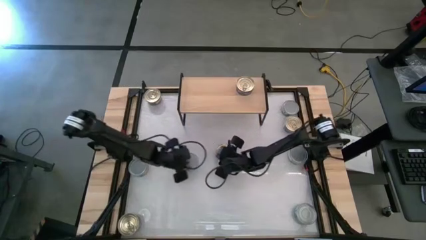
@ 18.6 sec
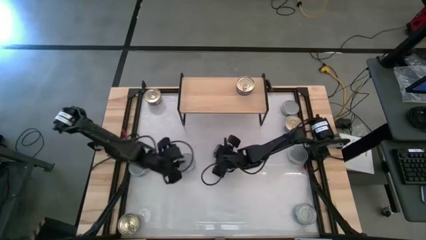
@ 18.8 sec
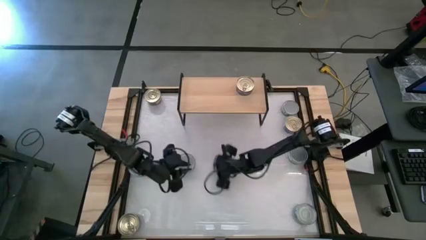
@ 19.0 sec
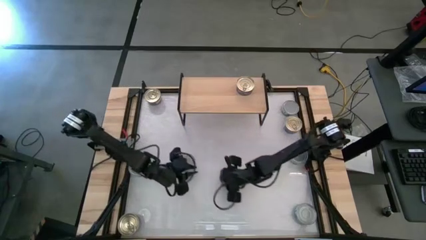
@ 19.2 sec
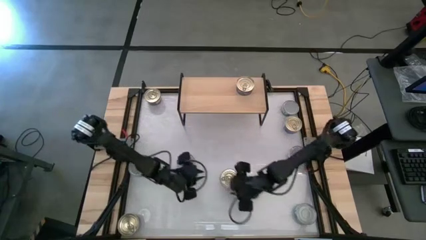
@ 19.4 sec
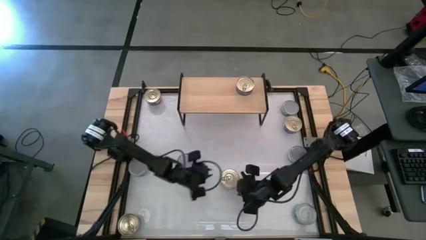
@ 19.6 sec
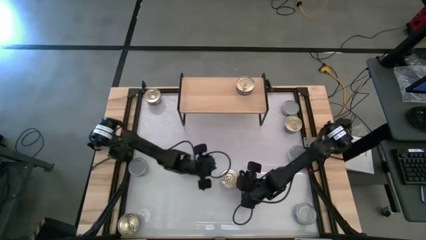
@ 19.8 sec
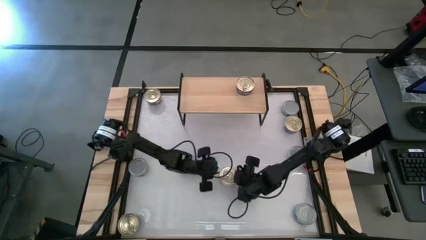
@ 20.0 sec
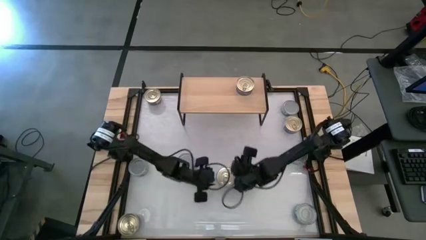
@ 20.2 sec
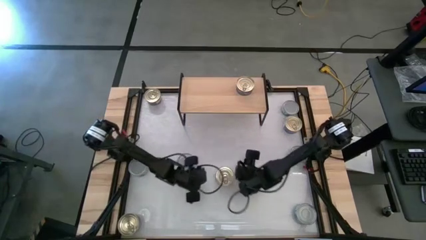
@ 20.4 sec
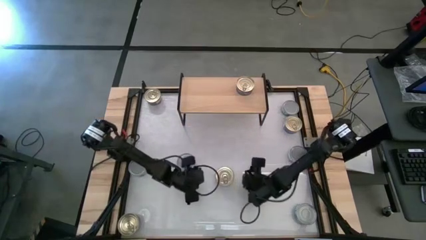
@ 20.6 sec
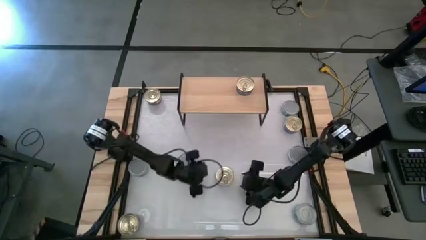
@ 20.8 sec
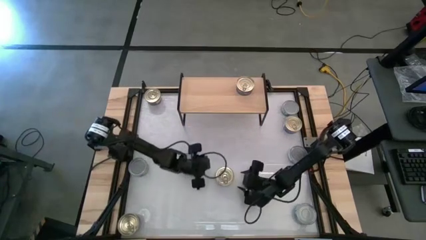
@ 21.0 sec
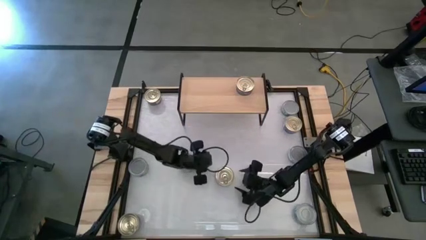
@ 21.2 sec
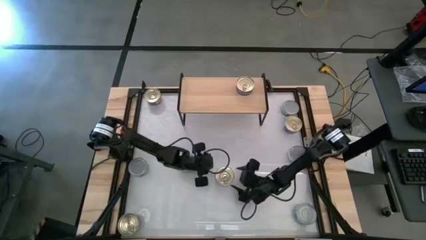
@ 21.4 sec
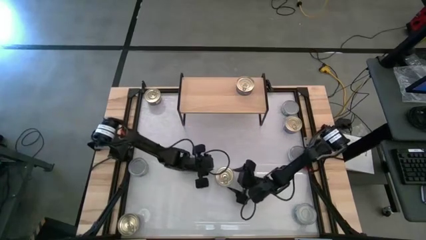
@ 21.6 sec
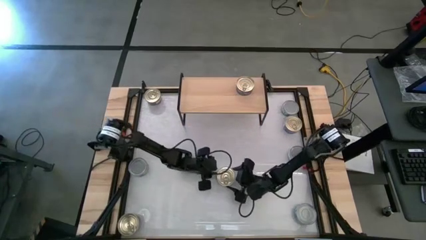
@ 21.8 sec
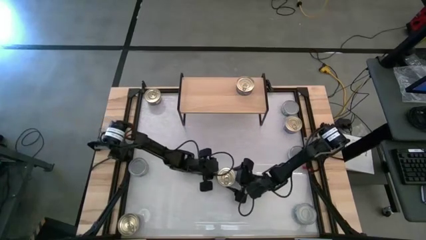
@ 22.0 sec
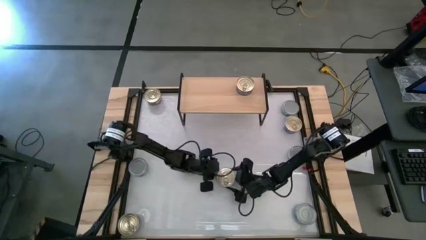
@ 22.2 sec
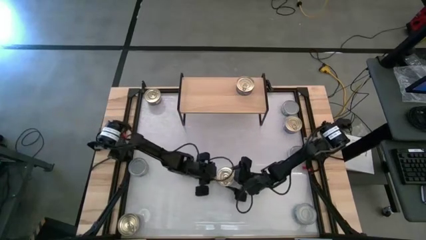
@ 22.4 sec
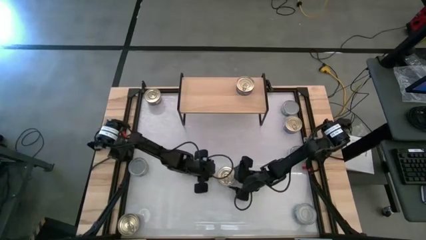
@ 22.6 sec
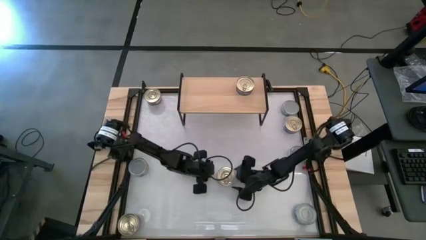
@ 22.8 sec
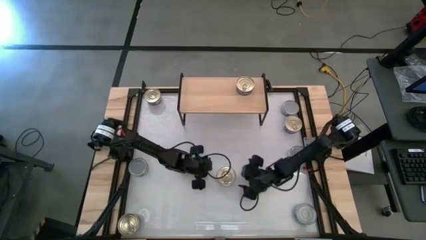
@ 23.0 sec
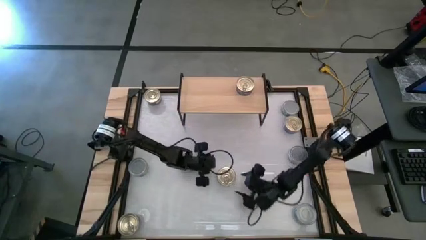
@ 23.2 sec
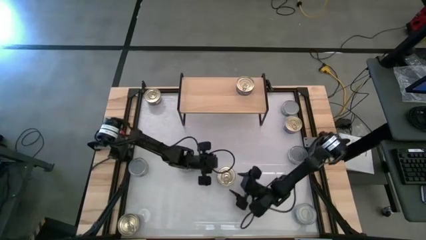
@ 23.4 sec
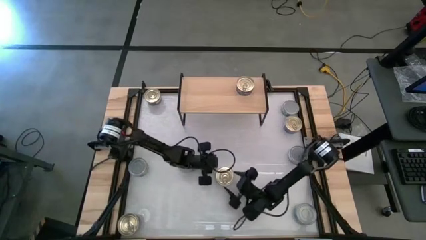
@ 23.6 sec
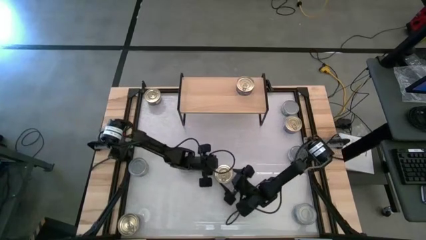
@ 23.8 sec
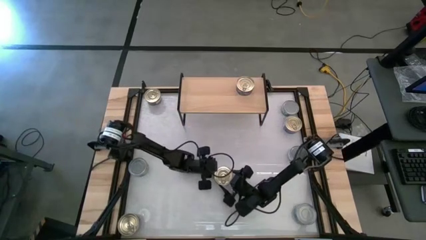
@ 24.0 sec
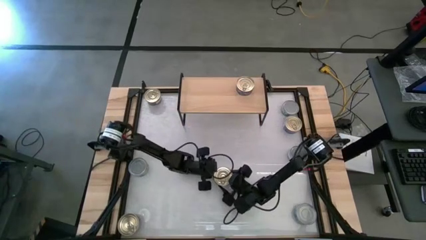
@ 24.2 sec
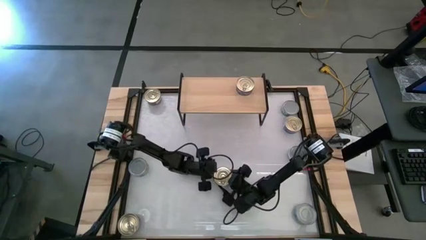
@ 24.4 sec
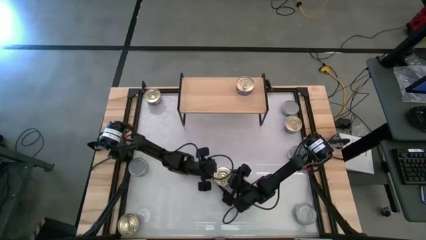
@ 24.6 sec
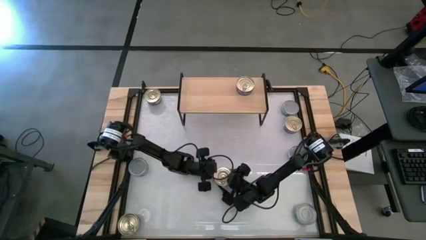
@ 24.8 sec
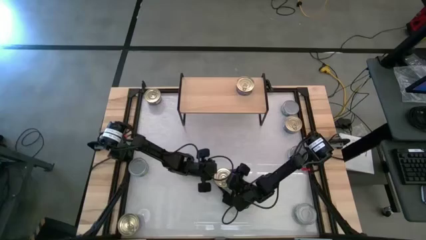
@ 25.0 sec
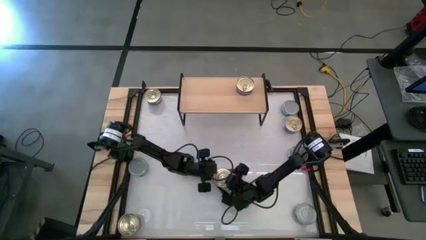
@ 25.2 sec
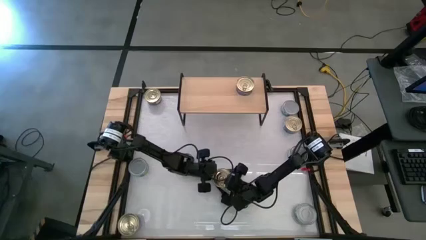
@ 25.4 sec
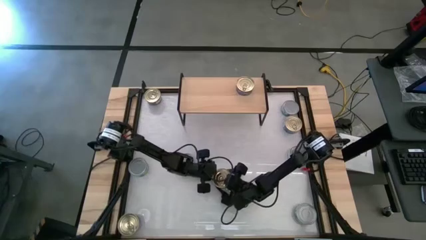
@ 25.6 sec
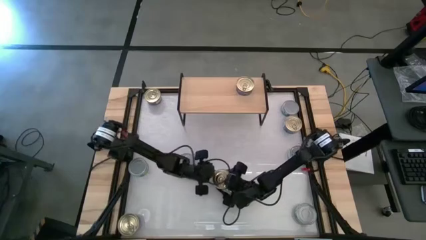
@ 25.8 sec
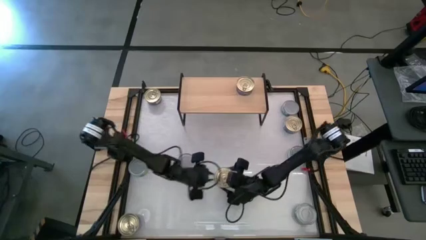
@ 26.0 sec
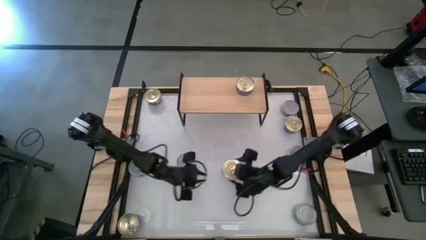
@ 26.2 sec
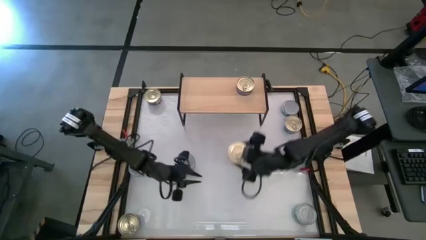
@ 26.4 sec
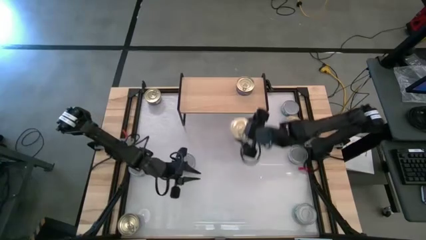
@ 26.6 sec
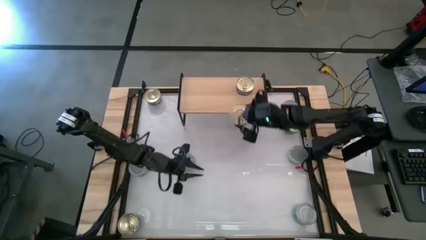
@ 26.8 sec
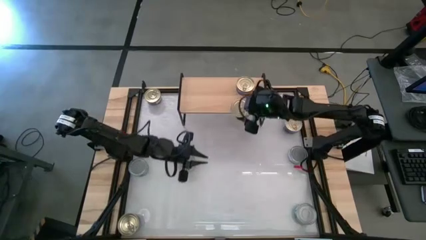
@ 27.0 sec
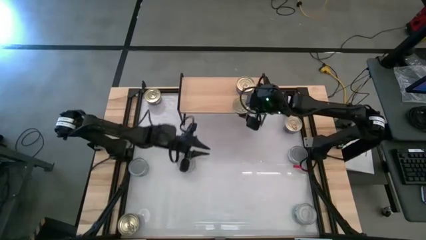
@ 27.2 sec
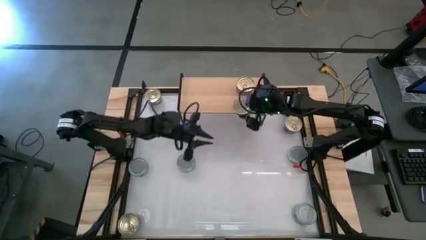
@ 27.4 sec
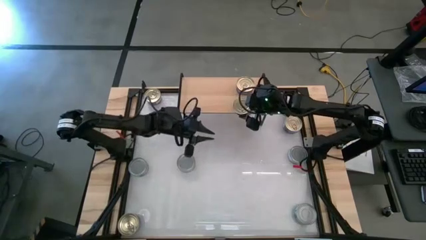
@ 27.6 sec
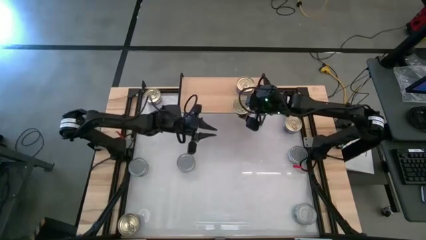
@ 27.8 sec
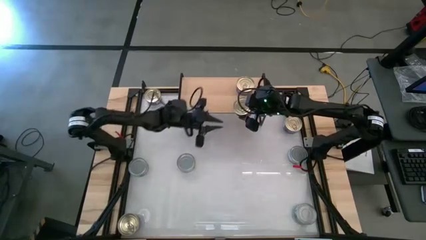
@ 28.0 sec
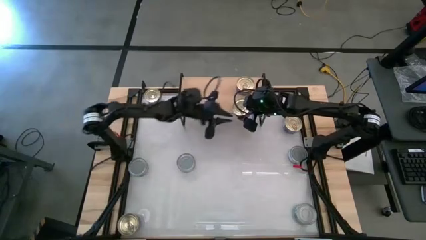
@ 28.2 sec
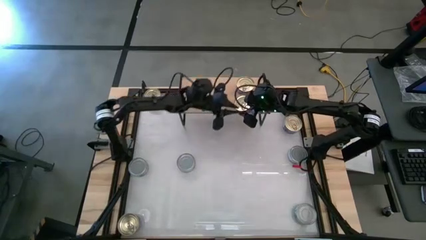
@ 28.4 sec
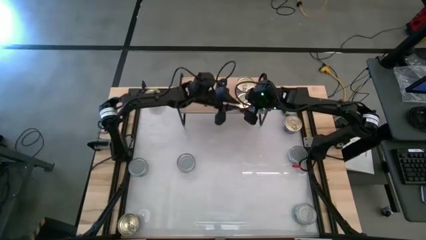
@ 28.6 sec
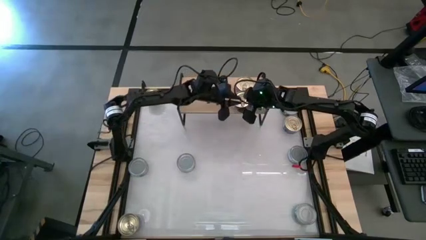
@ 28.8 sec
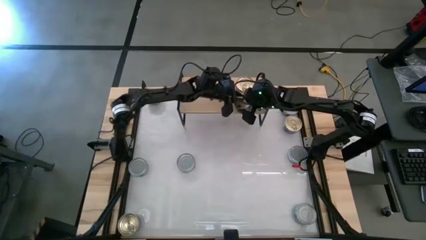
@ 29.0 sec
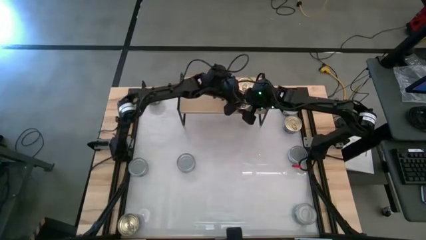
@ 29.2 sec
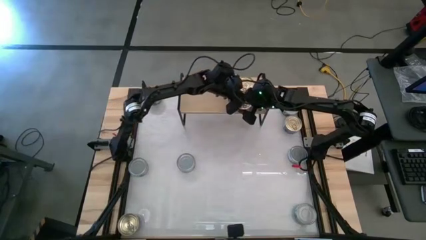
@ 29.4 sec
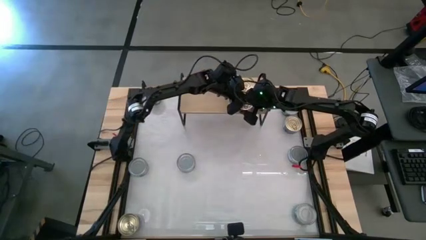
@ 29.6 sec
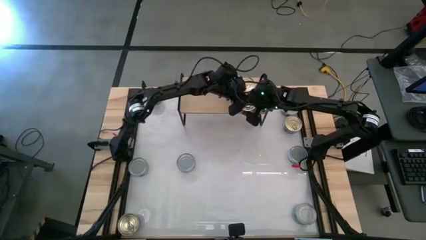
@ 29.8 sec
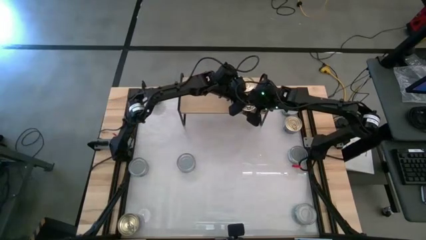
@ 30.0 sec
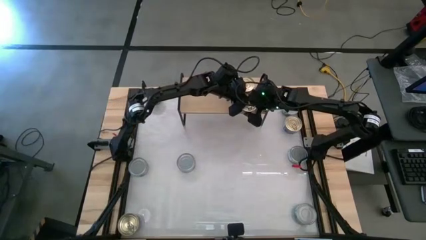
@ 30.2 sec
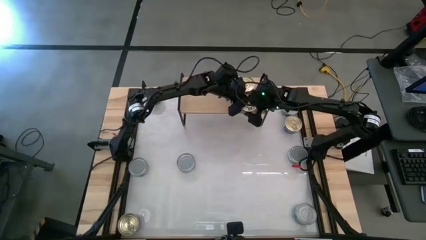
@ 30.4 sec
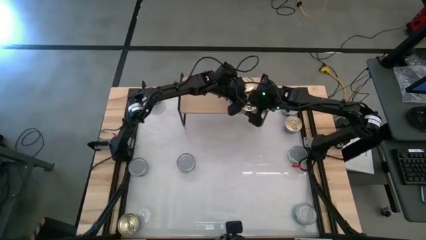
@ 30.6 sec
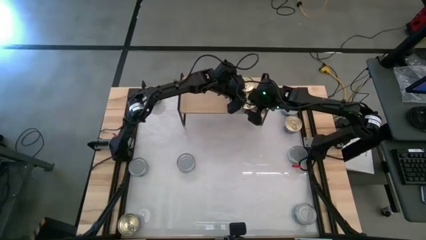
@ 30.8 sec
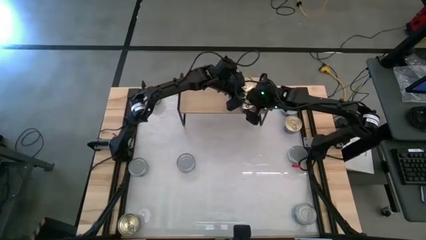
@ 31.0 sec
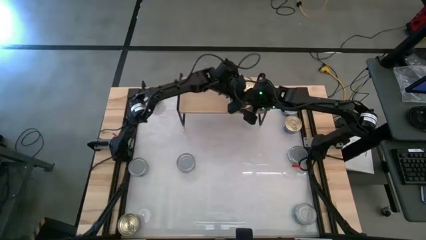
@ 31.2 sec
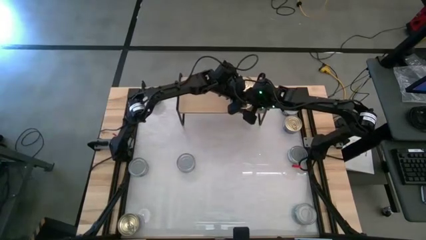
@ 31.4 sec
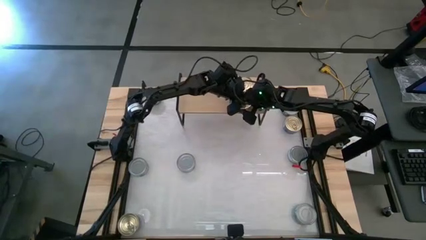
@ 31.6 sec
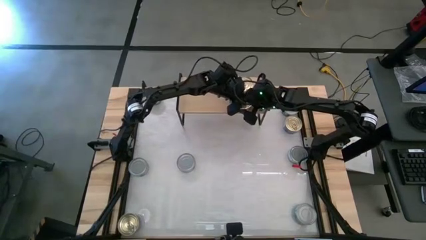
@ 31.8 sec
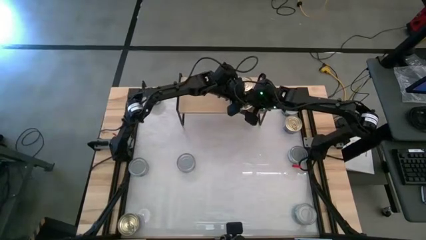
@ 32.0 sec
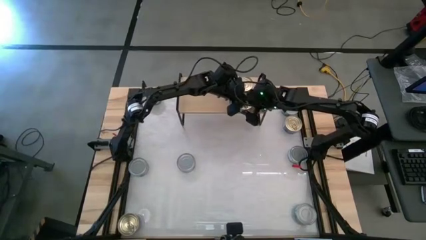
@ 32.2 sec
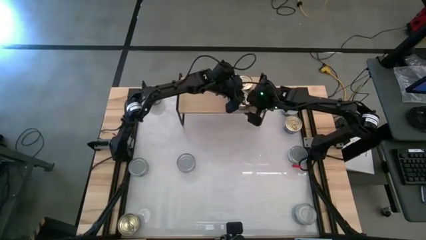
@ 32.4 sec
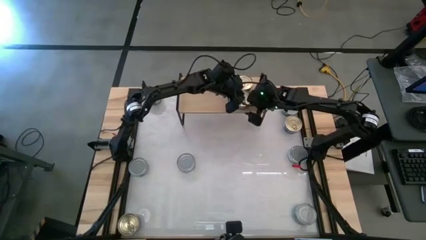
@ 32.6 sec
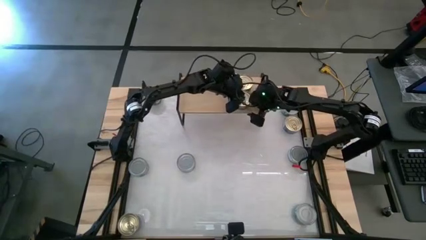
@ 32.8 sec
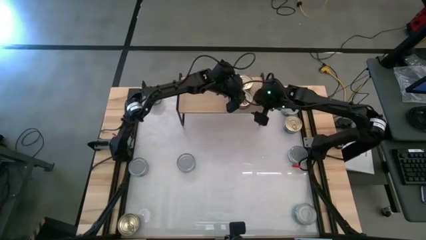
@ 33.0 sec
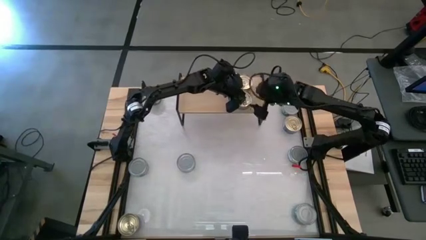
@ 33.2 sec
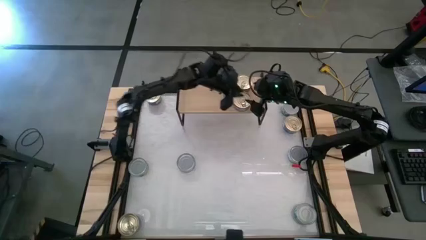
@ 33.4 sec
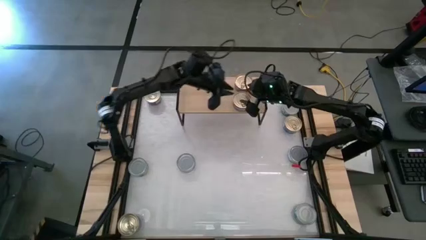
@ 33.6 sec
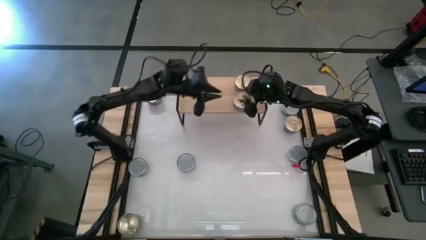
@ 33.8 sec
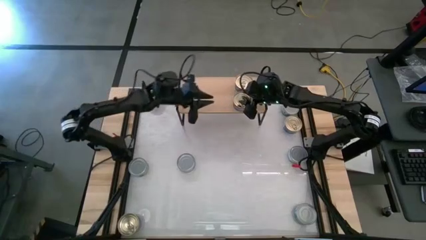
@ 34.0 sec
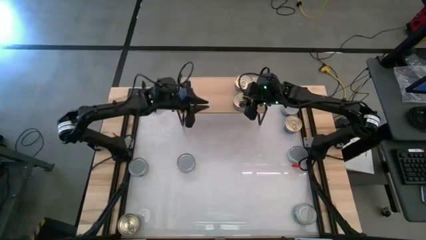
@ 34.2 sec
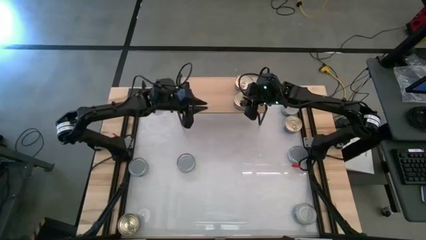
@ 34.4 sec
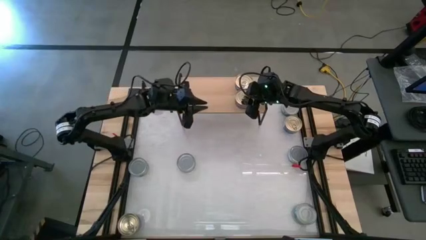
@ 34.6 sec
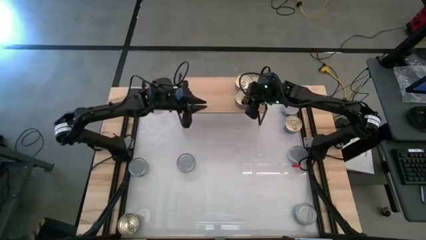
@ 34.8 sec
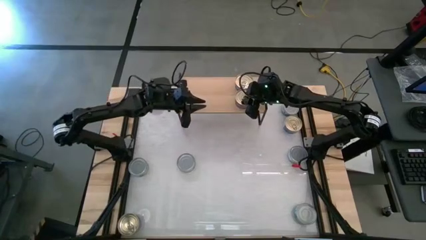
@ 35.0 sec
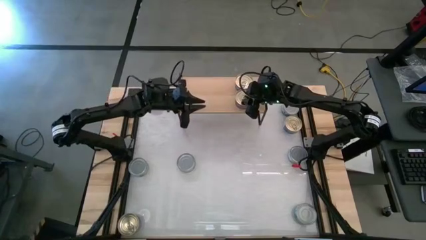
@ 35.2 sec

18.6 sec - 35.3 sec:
Task: Stack canned seafood by type on shelf
Put the blue-pink tuna can on the shelf aligned with the other blue-pink tuna can
